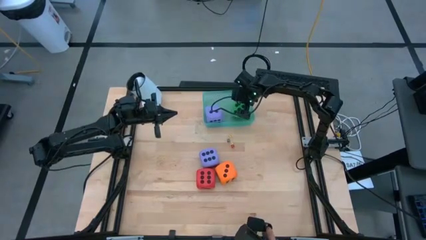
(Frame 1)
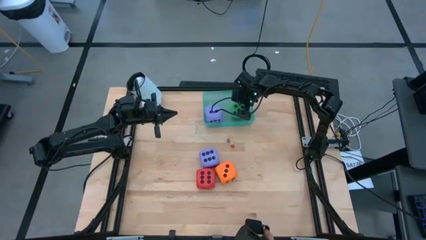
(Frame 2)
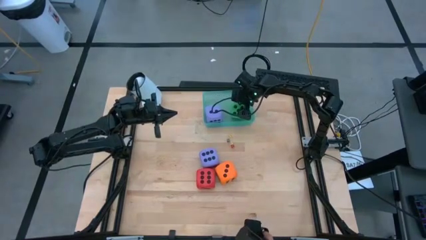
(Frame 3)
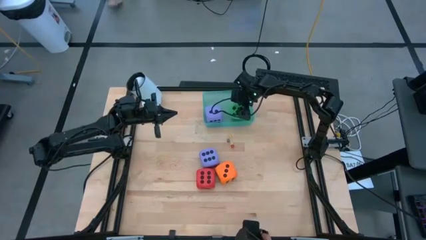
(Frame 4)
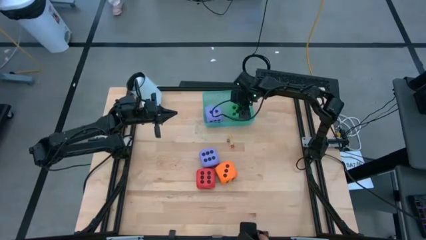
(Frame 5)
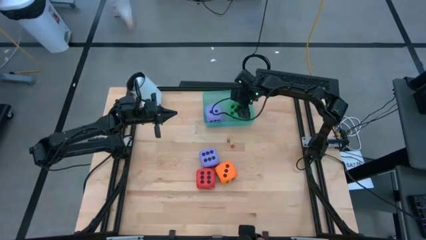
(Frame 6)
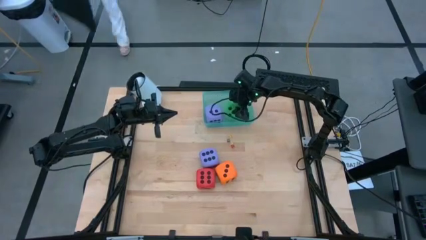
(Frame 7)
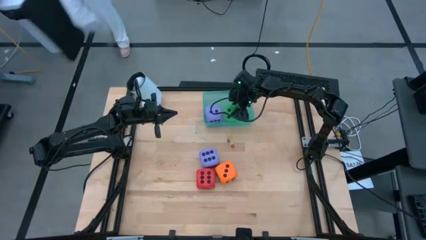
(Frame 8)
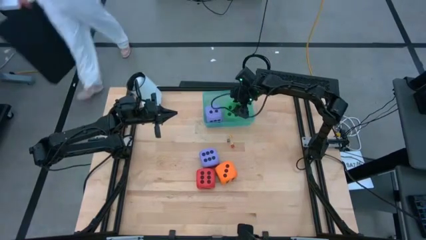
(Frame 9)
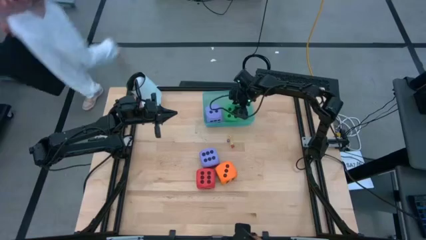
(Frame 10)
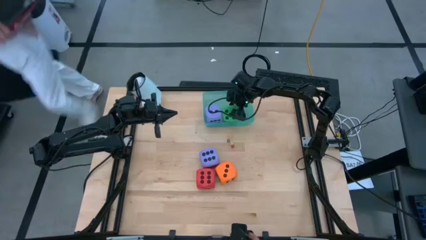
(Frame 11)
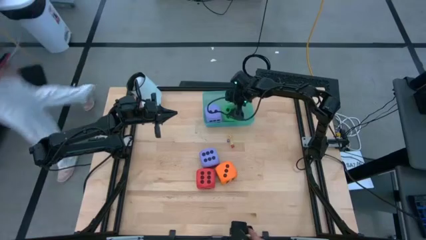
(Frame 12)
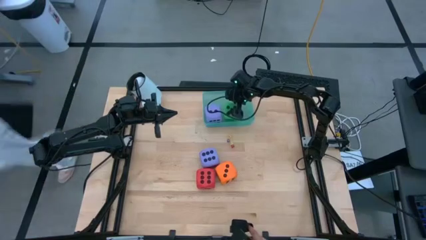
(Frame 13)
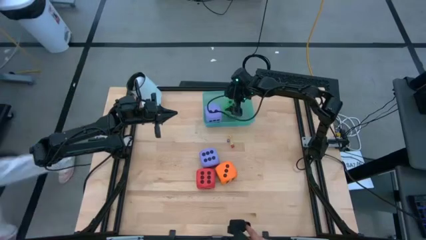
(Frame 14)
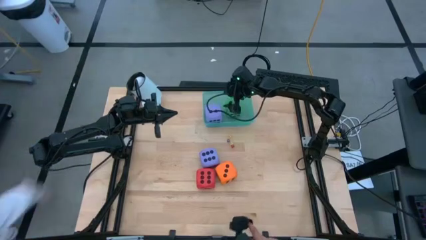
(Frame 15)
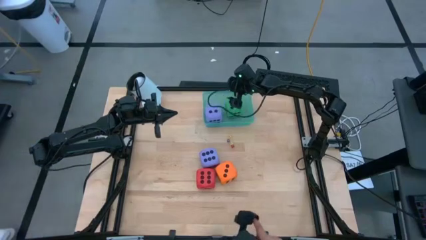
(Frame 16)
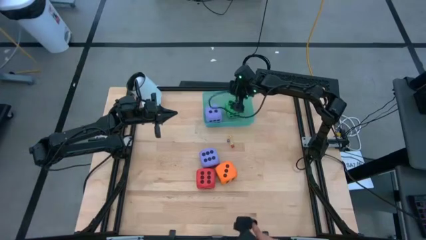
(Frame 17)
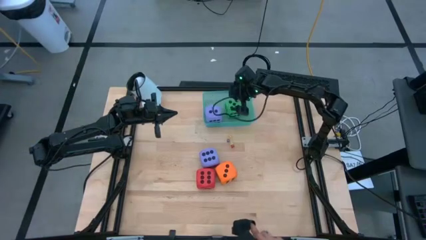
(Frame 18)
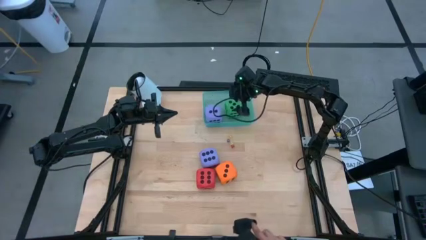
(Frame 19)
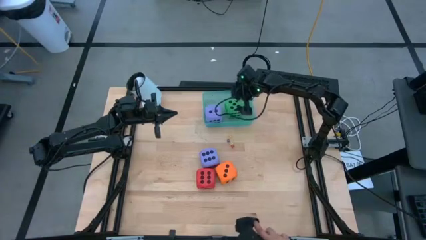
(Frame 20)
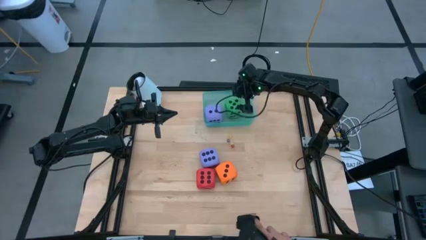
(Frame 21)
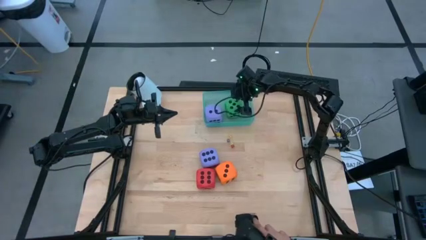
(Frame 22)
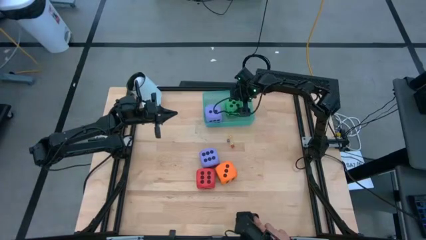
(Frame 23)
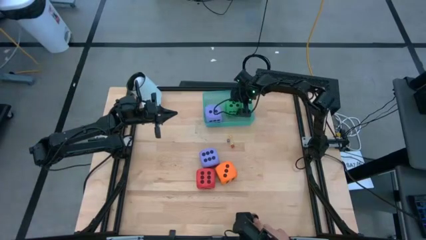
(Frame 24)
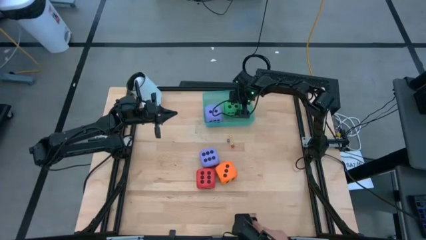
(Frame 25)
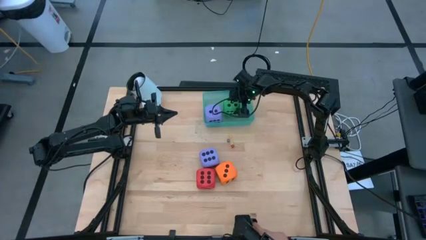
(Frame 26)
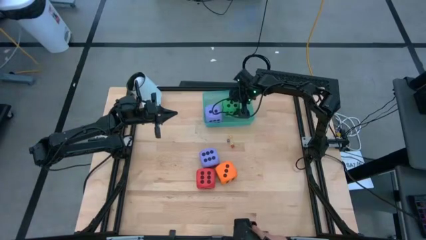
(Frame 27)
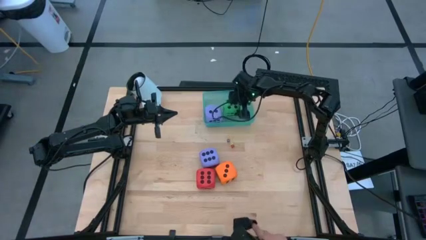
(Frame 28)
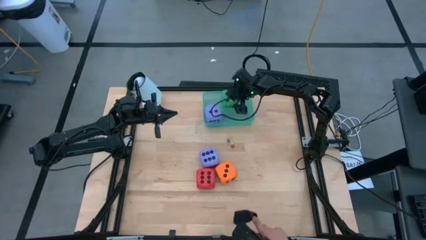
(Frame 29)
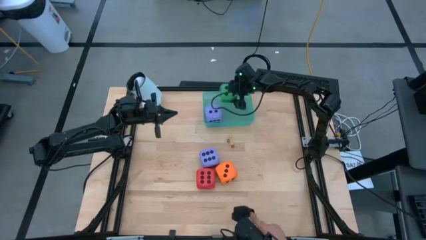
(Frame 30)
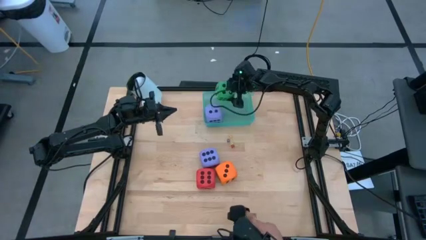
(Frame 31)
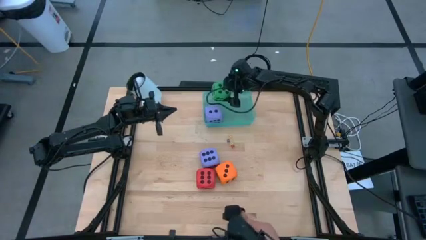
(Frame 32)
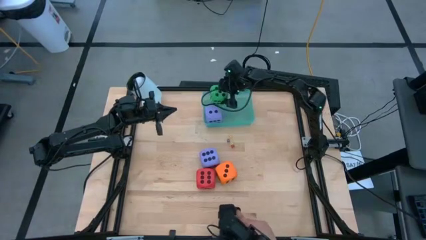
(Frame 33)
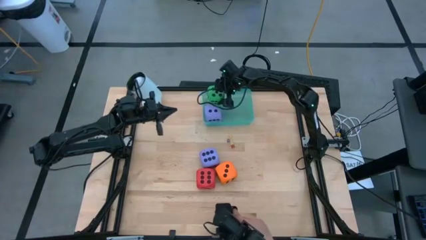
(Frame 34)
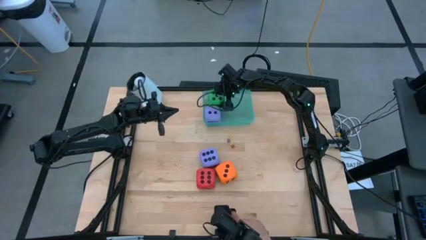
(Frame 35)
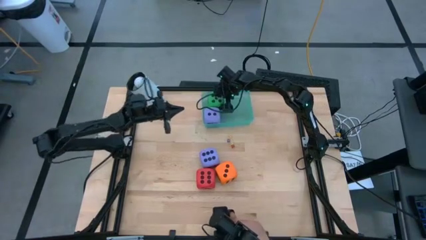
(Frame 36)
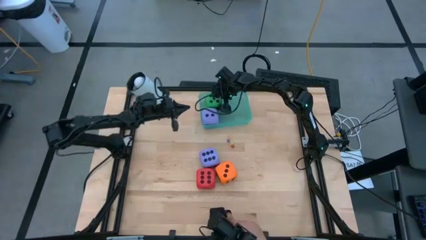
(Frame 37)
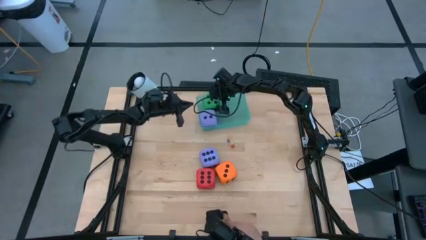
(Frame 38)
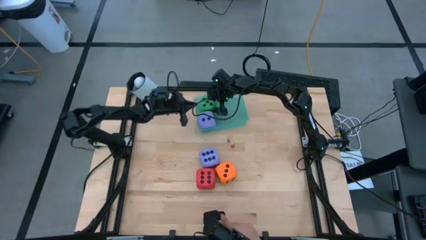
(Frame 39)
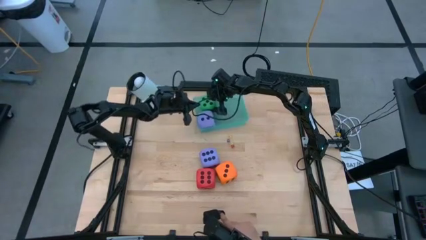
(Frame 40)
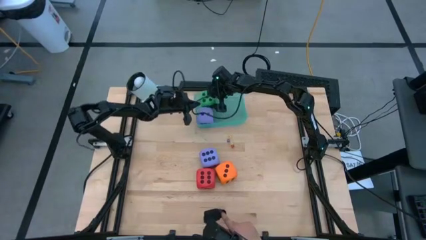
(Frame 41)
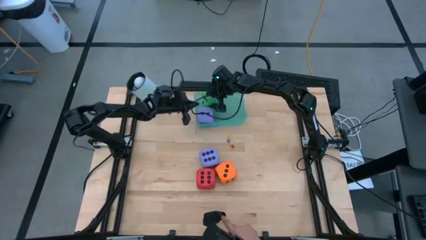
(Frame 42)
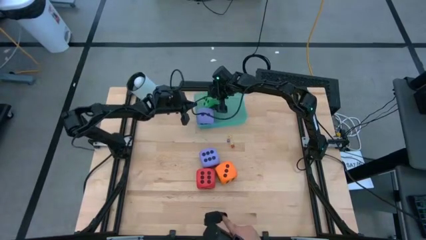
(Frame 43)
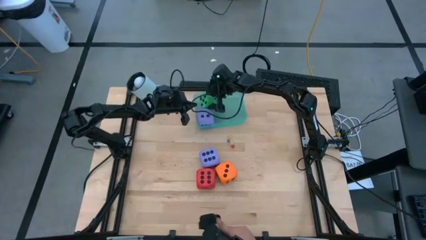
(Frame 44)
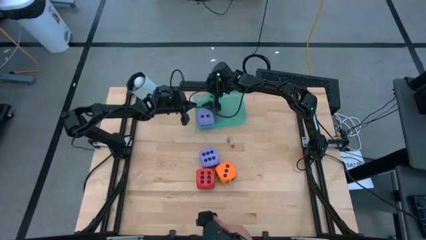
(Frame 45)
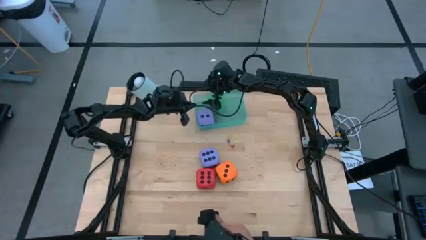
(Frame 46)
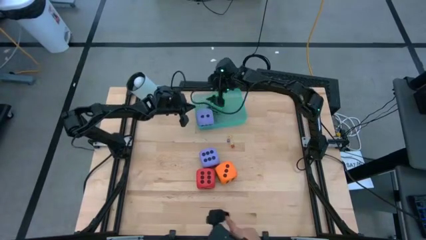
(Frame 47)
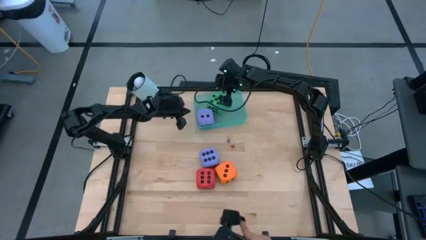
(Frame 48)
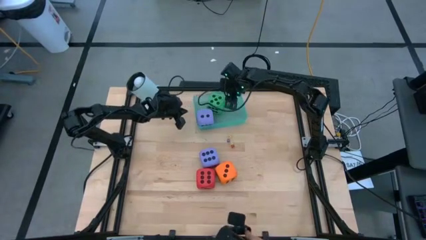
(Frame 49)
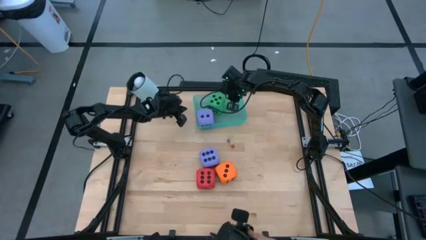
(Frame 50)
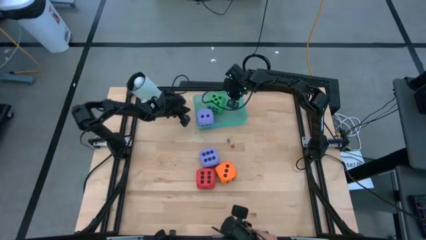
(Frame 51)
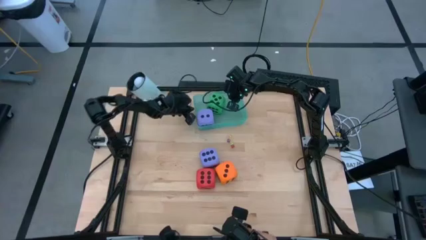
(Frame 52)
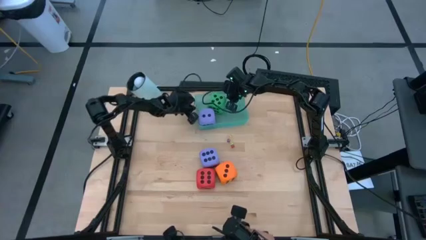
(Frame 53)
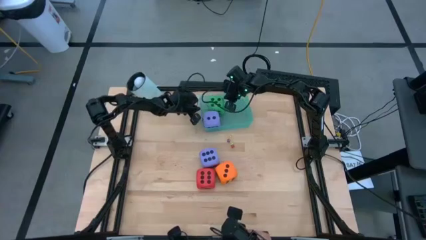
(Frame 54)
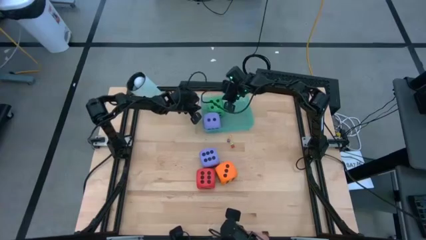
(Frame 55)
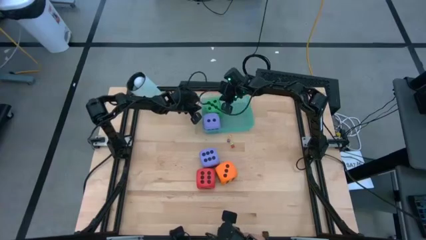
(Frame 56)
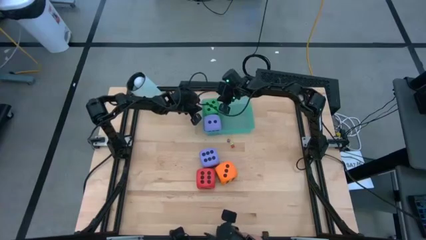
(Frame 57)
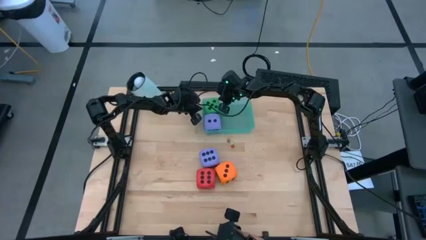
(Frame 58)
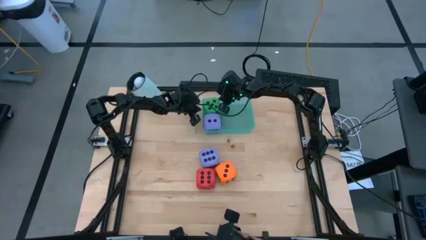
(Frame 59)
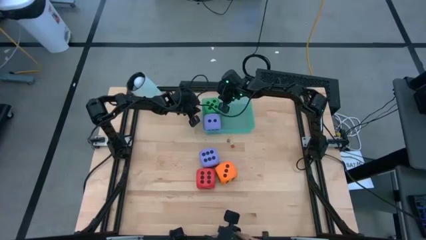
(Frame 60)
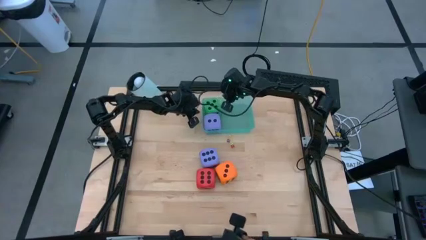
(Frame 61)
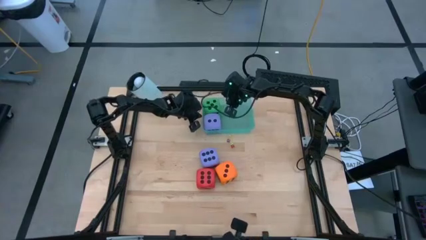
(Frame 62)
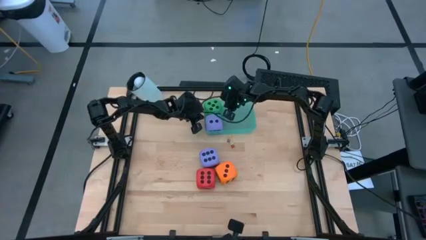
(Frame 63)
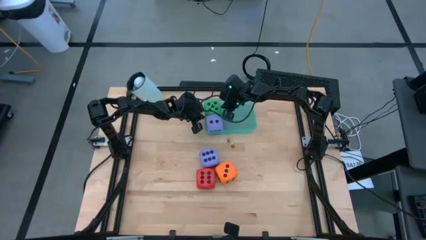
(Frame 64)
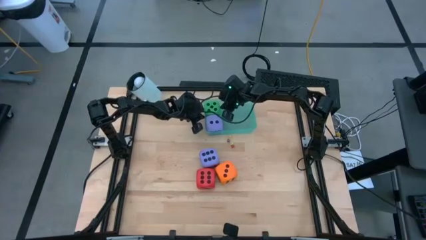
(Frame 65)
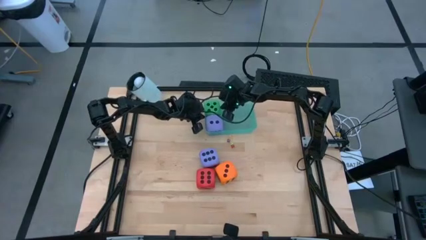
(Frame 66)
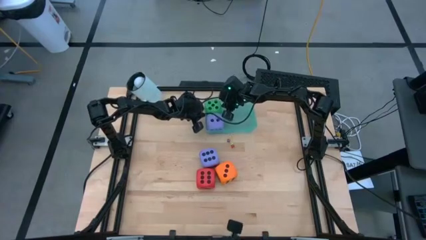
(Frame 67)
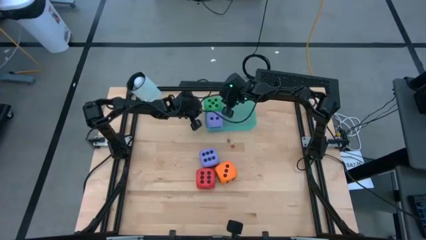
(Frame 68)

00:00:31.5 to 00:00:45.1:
Task: Pick & Place Dice
Put the large green dice into the green container
